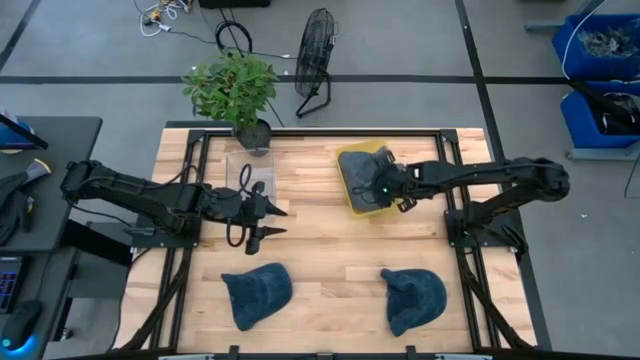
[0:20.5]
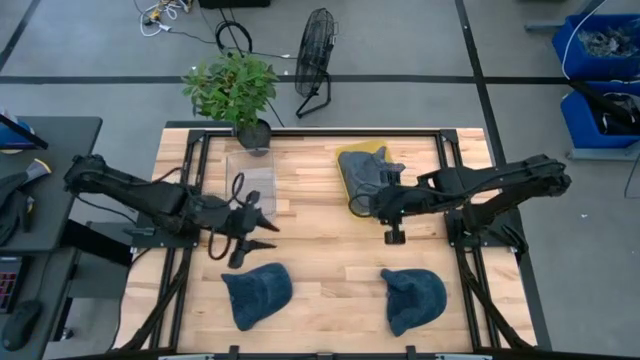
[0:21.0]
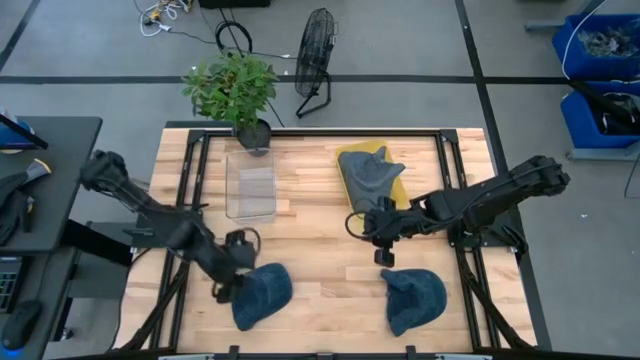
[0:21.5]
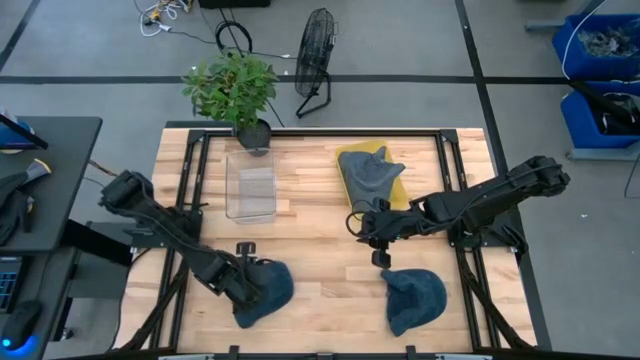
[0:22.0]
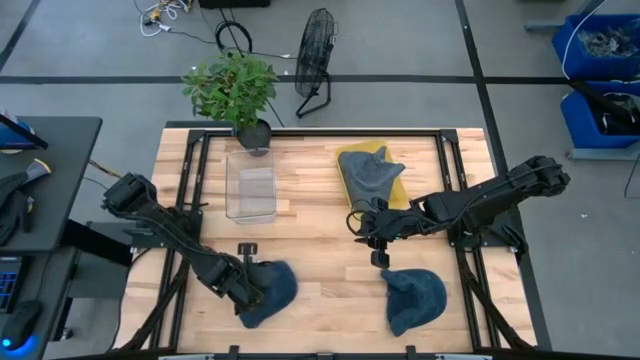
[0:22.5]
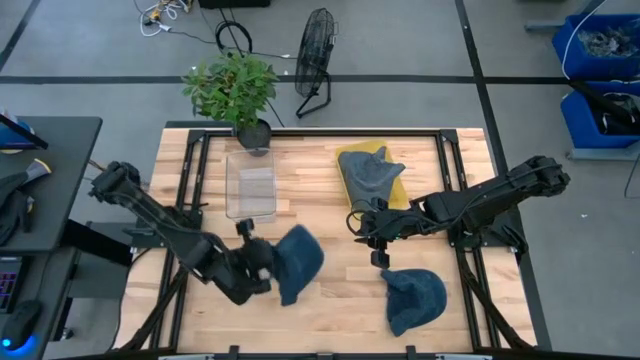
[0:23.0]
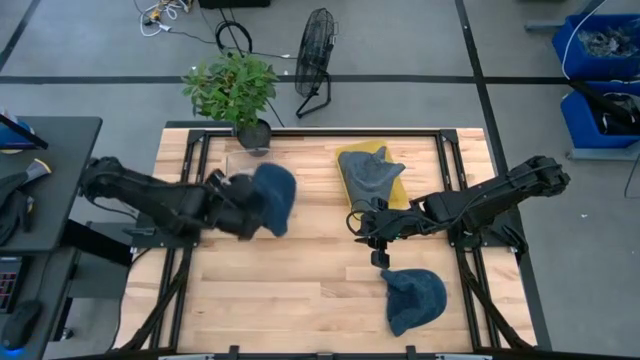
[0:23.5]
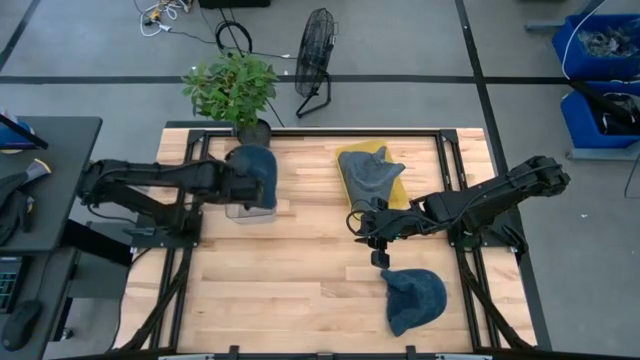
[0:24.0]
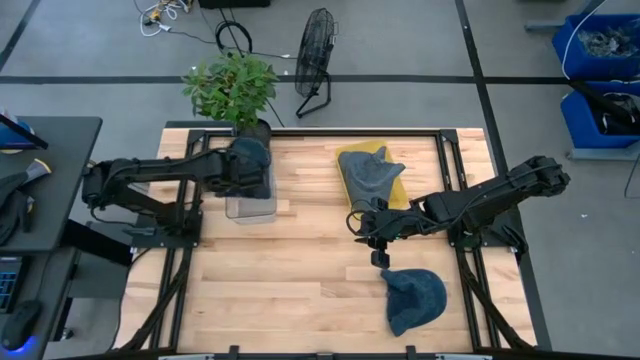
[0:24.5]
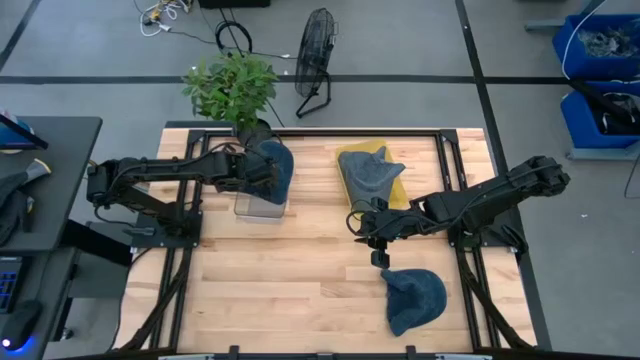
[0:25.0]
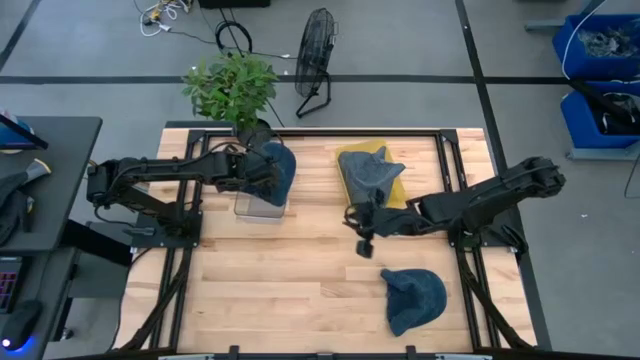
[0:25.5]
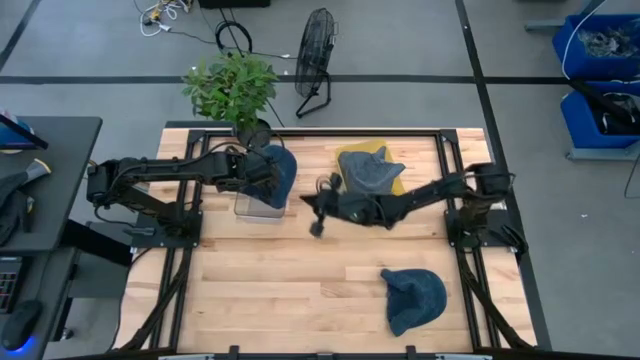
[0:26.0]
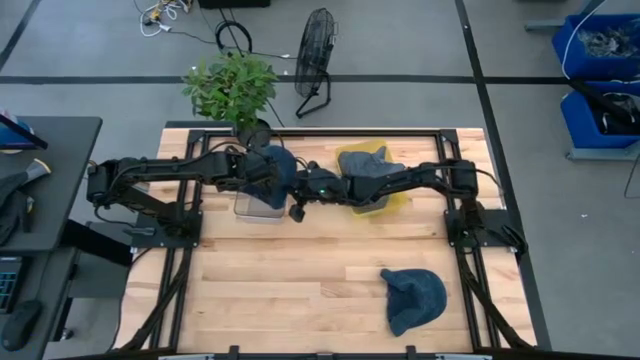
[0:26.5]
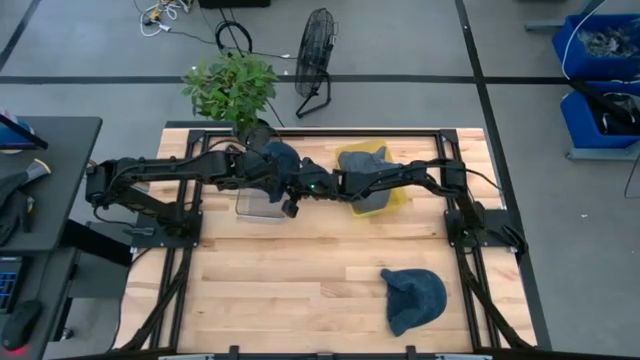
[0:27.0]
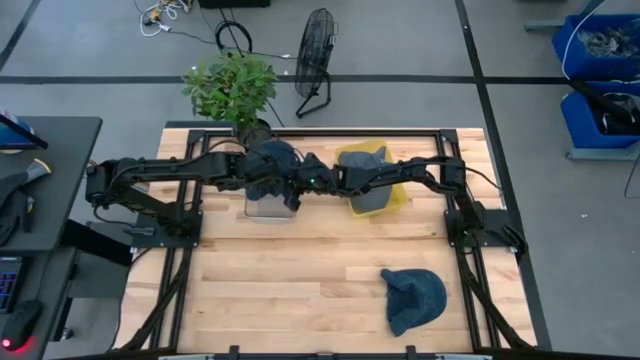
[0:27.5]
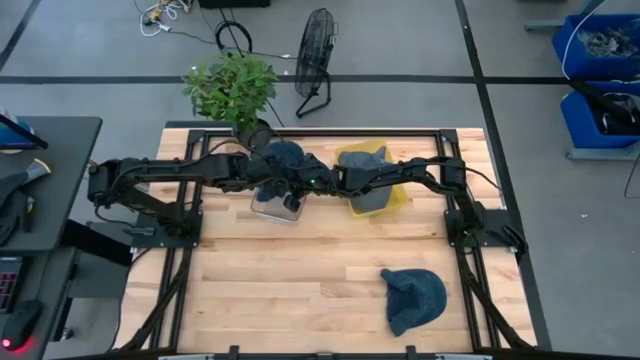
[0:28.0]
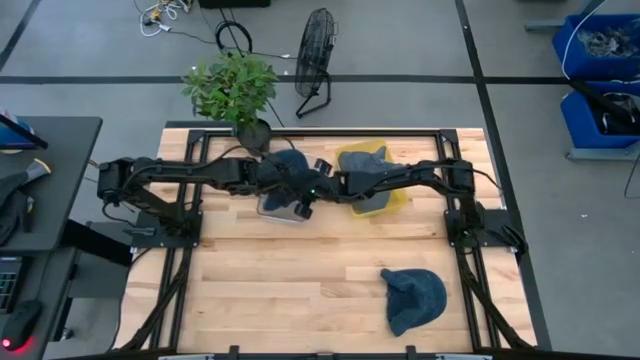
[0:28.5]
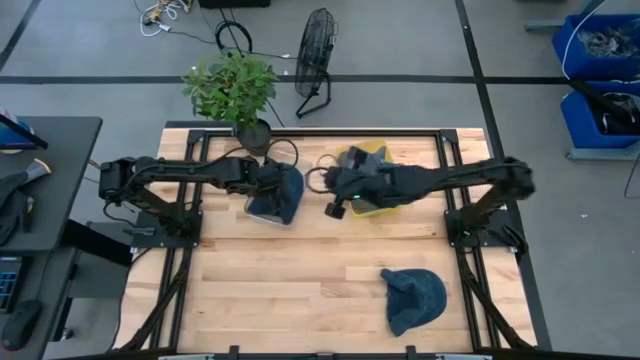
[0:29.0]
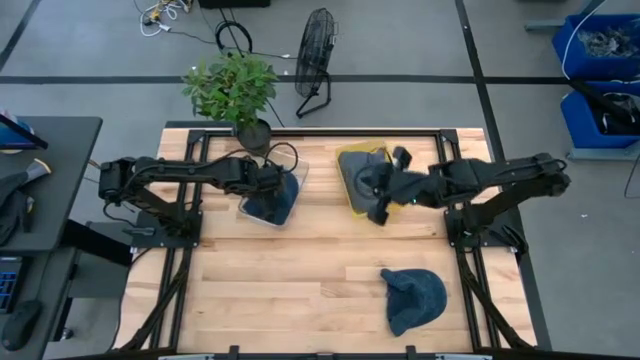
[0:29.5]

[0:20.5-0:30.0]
Task: Pick & Place hat
Put the left blue cap into the transparent bin

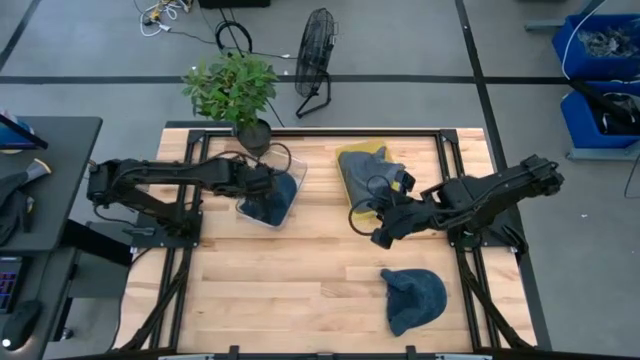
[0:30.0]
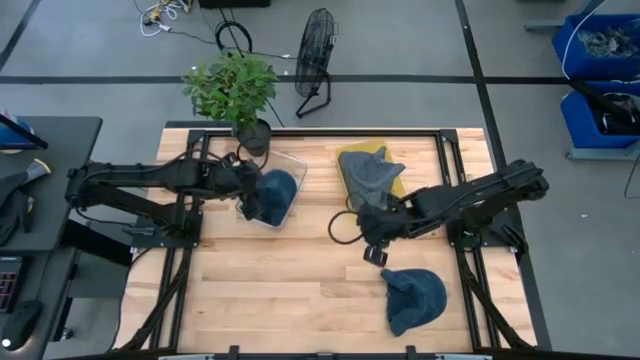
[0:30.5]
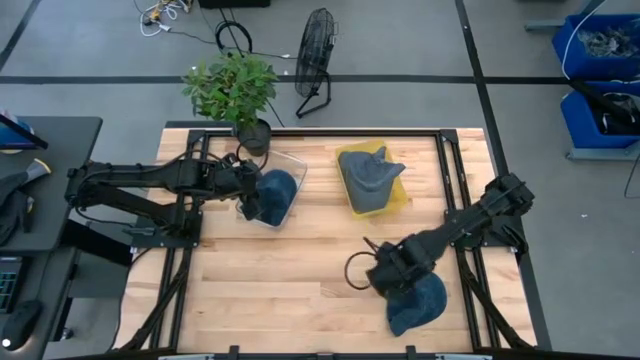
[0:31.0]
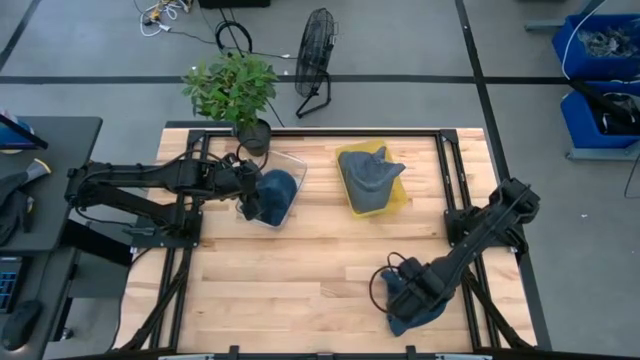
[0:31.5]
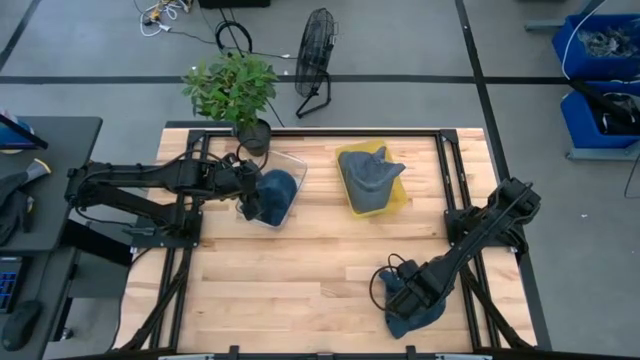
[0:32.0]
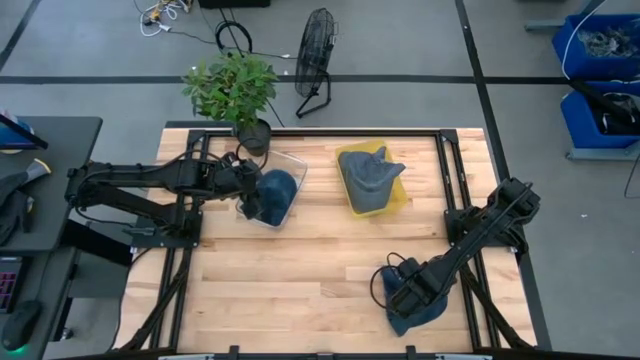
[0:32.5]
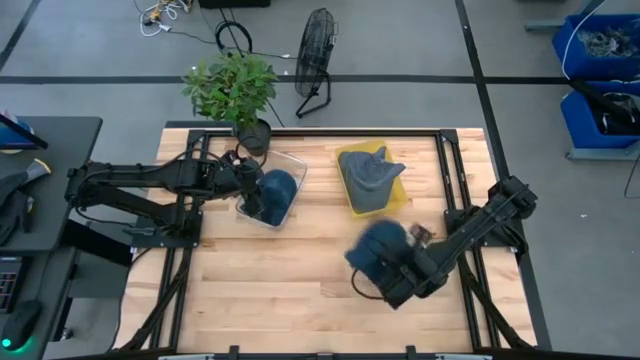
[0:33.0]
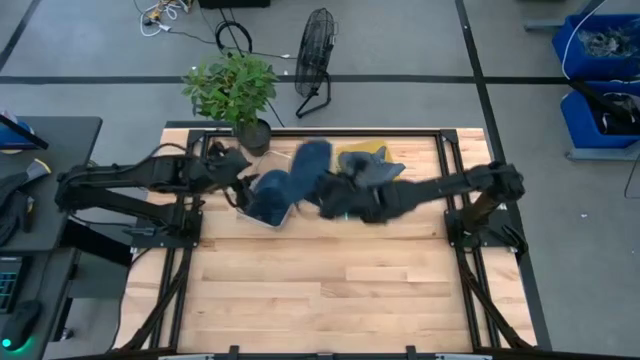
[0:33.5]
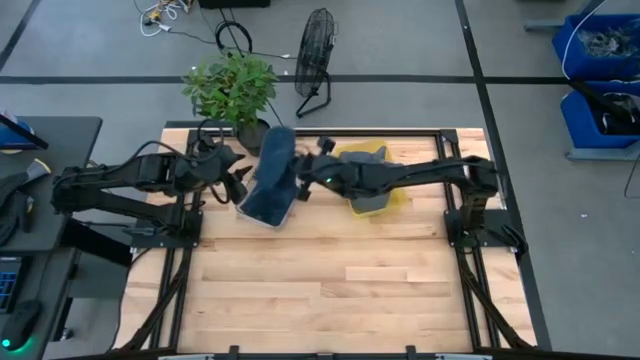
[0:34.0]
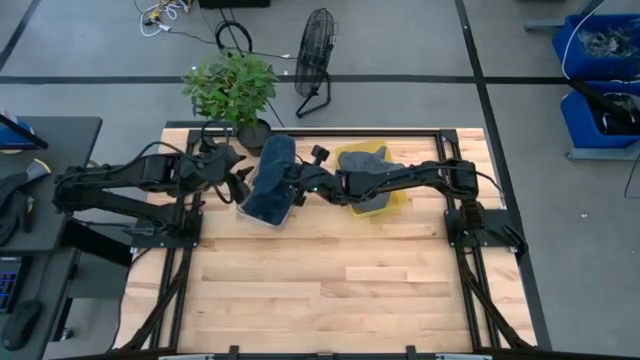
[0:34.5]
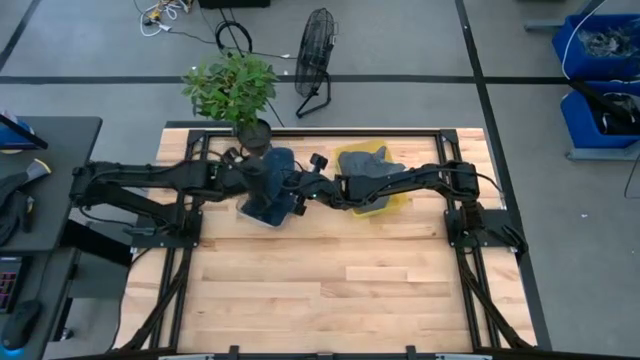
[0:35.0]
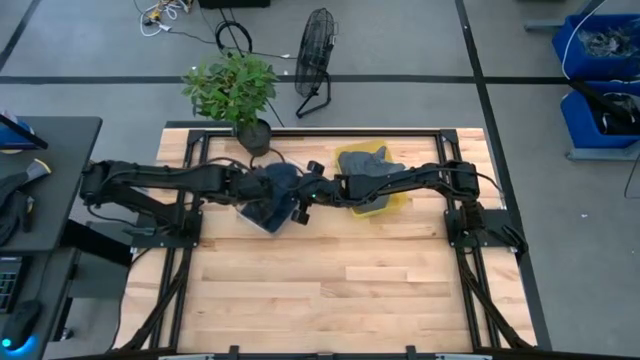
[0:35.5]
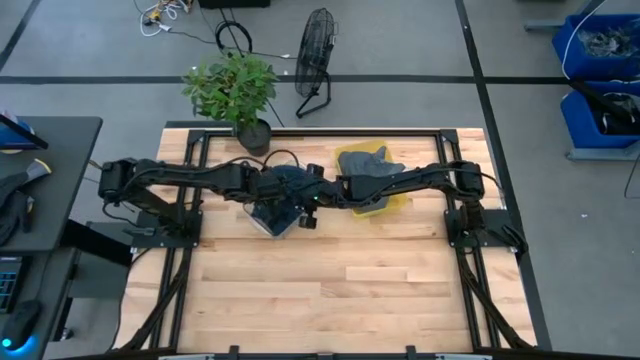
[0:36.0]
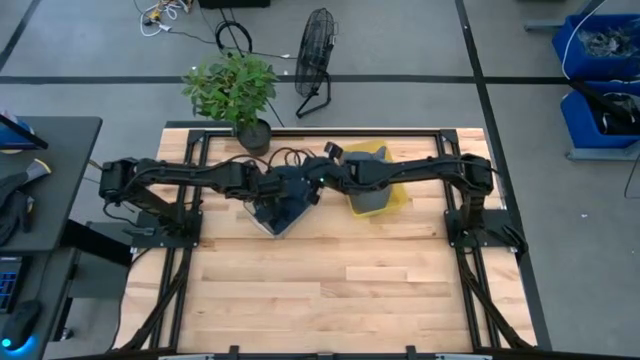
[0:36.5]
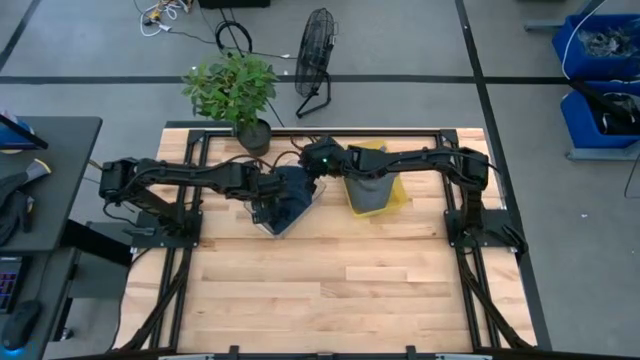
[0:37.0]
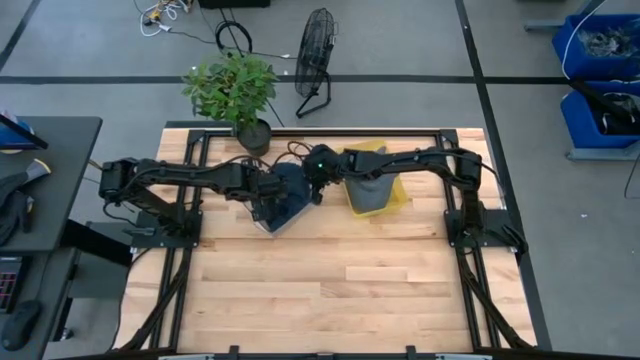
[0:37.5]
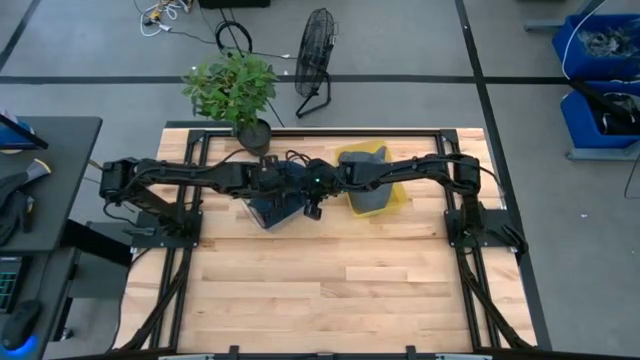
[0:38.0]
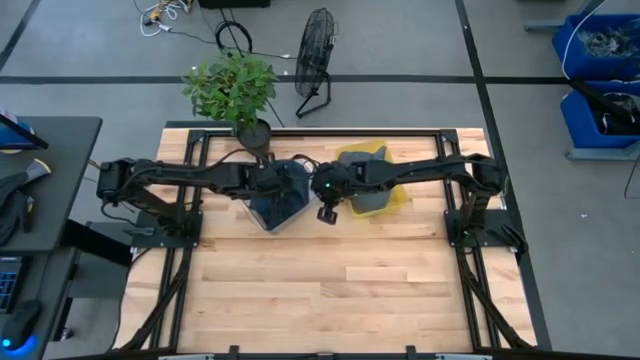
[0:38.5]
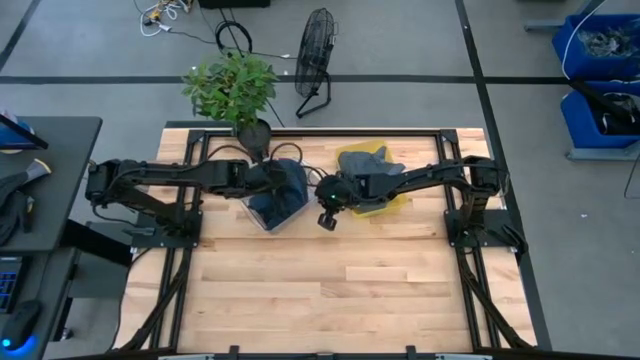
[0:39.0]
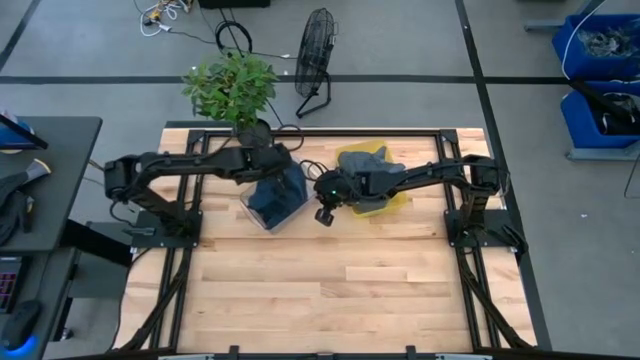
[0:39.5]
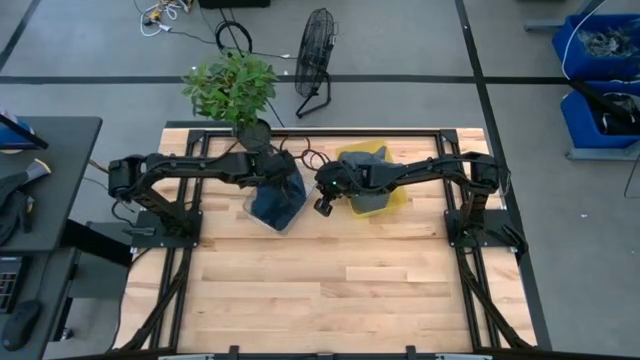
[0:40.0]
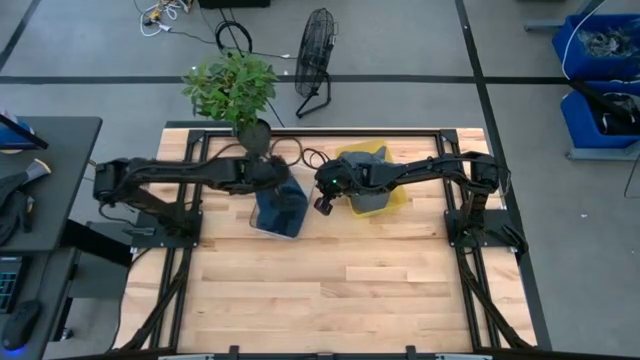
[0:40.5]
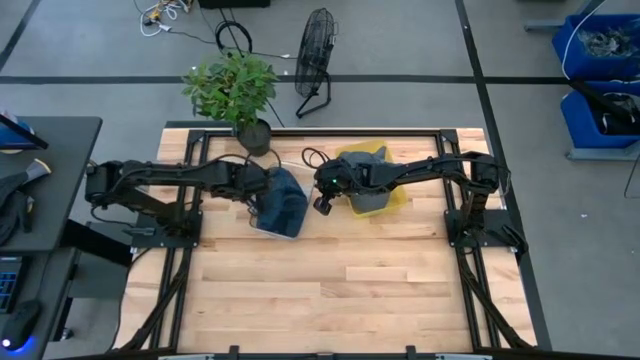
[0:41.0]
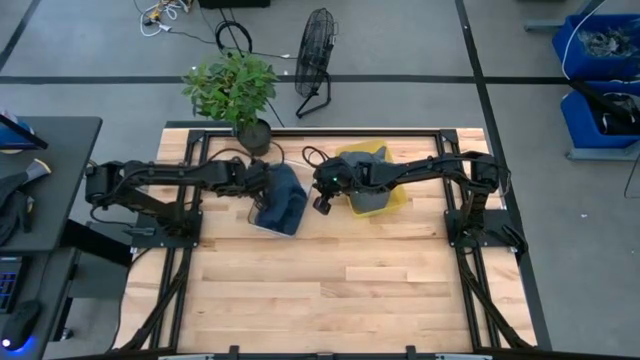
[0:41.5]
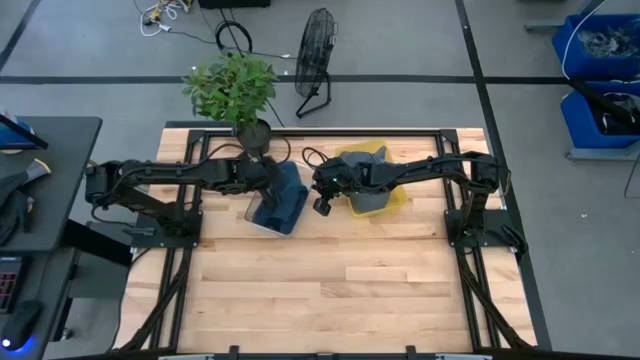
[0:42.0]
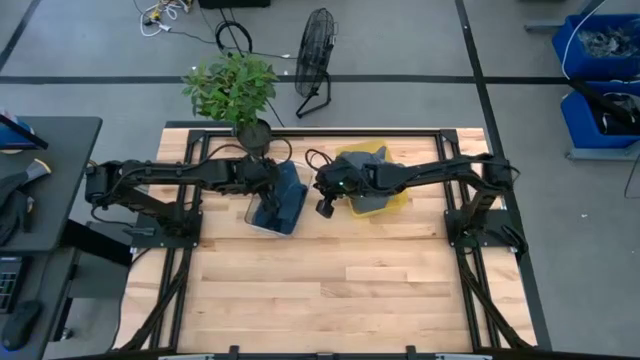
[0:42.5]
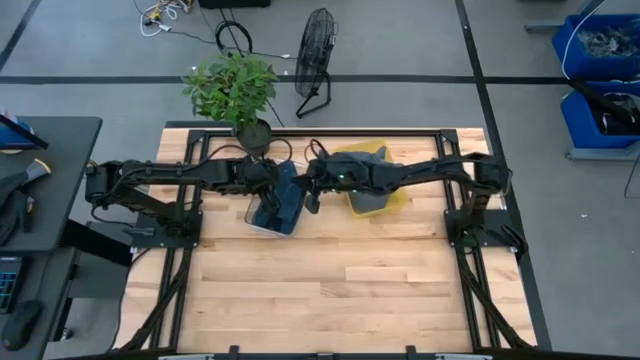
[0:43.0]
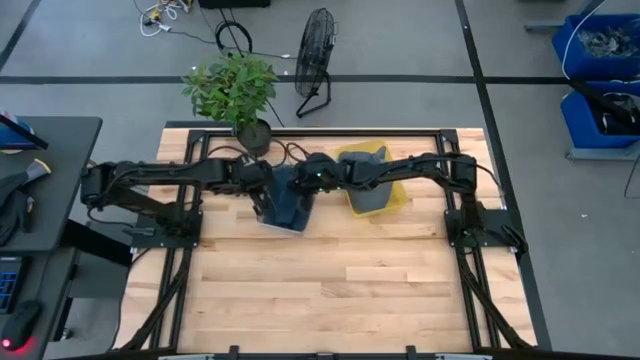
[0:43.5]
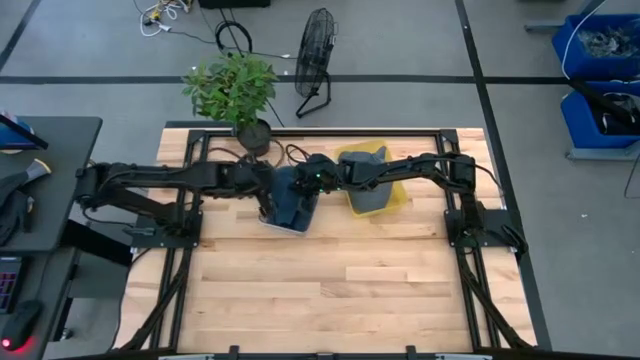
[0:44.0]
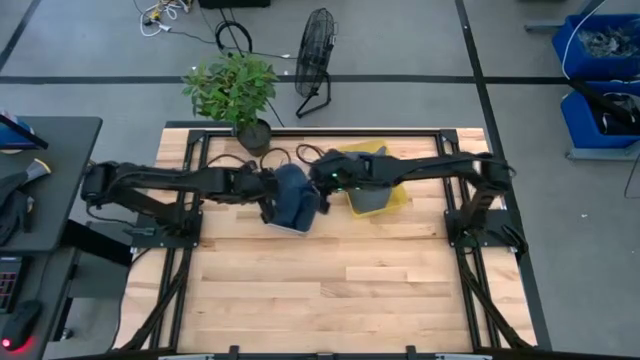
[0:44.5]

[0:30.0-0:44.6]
Put the blue cap into the transparent bin
